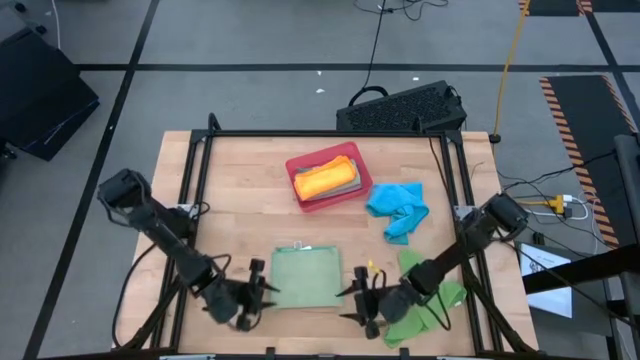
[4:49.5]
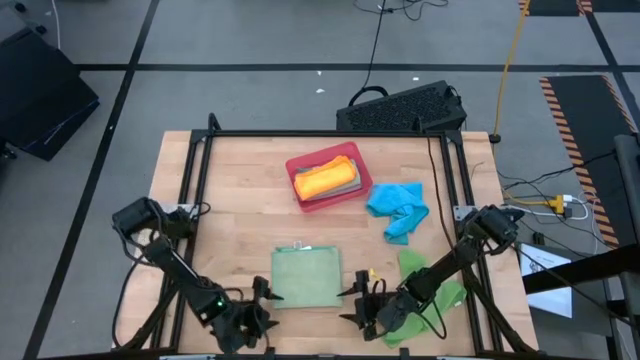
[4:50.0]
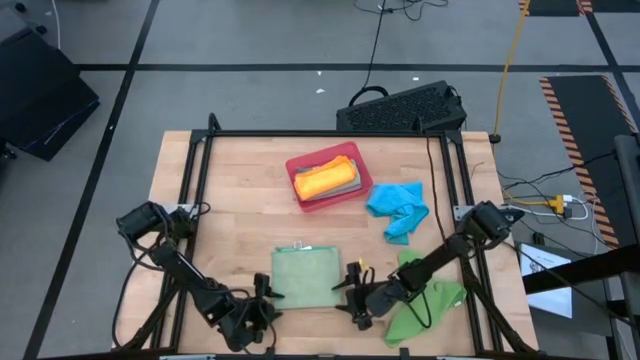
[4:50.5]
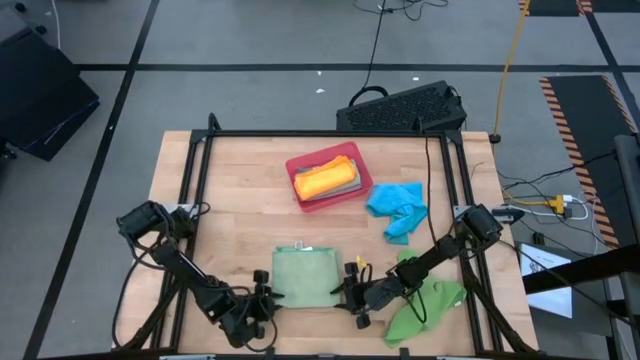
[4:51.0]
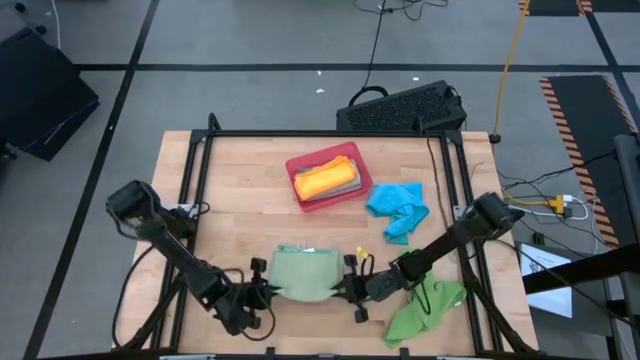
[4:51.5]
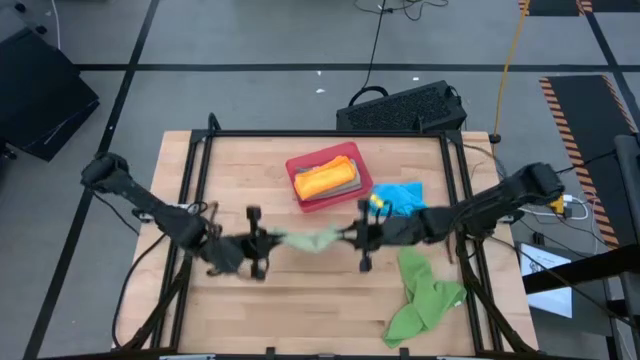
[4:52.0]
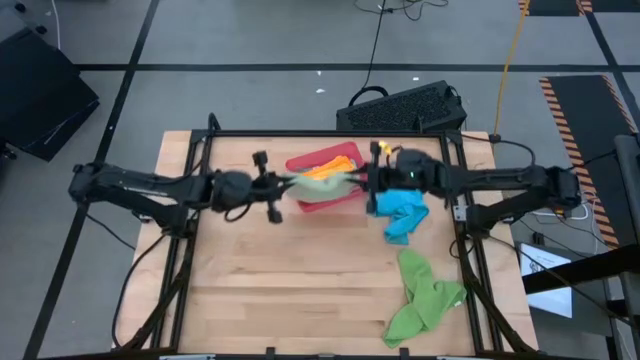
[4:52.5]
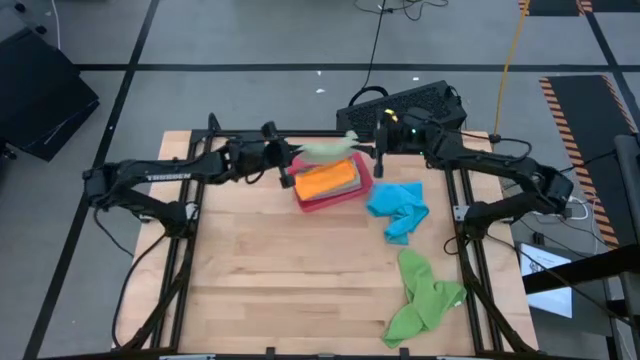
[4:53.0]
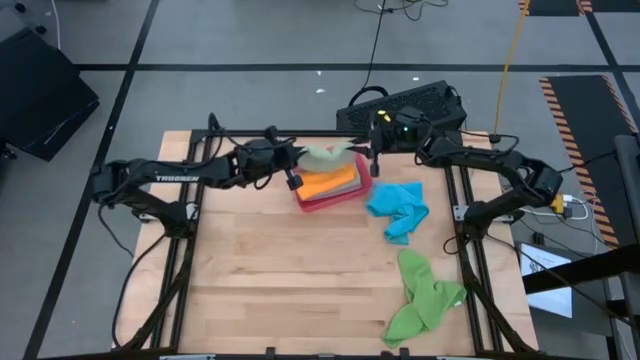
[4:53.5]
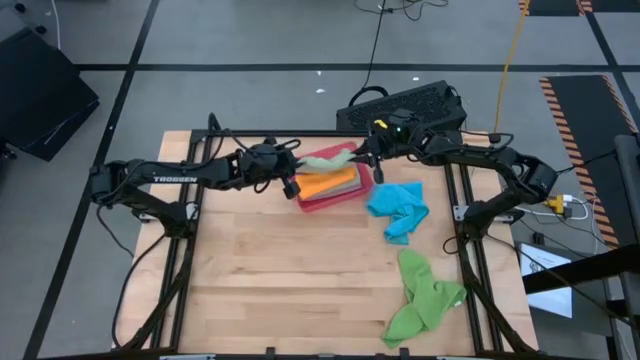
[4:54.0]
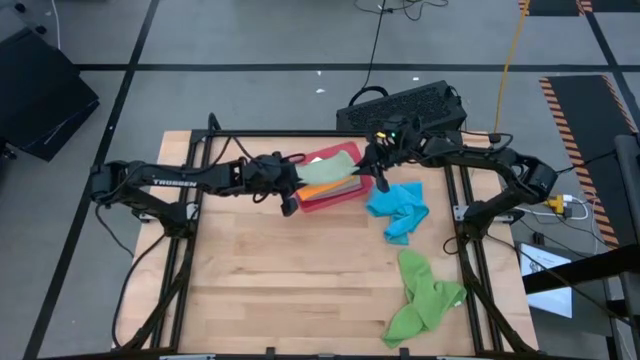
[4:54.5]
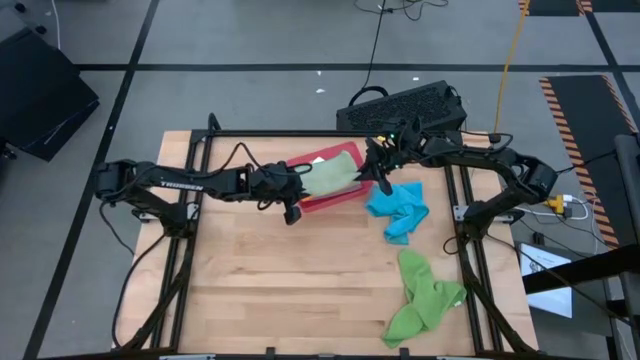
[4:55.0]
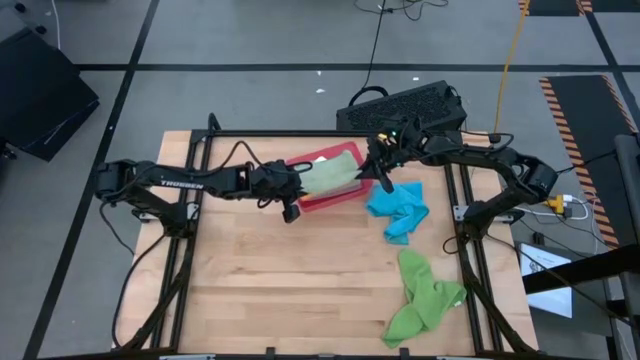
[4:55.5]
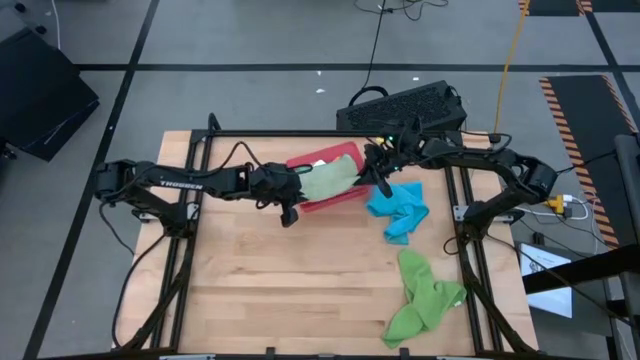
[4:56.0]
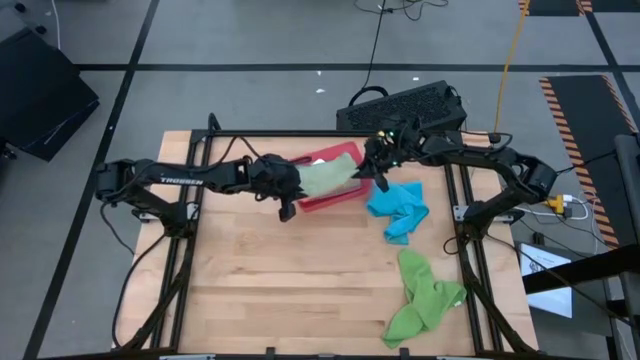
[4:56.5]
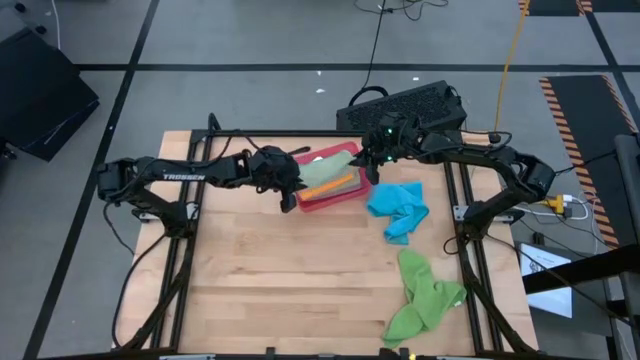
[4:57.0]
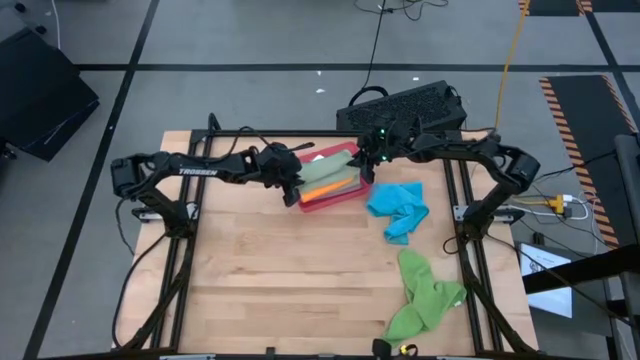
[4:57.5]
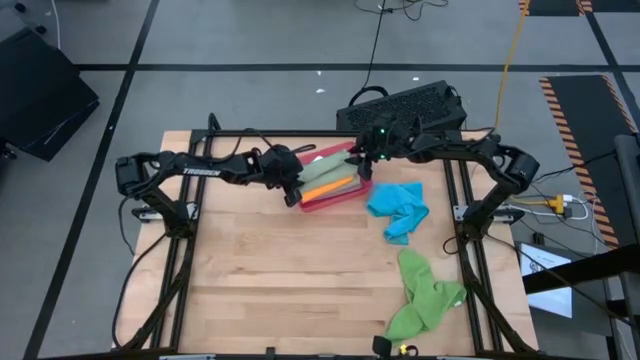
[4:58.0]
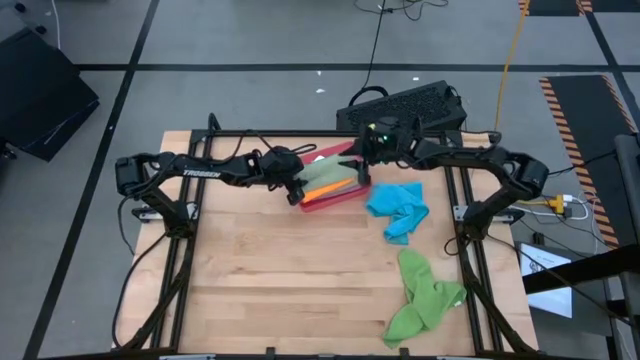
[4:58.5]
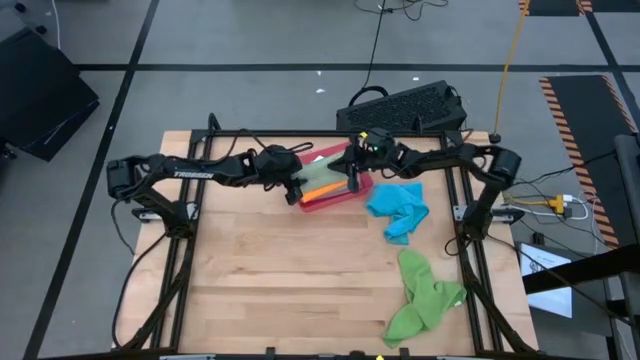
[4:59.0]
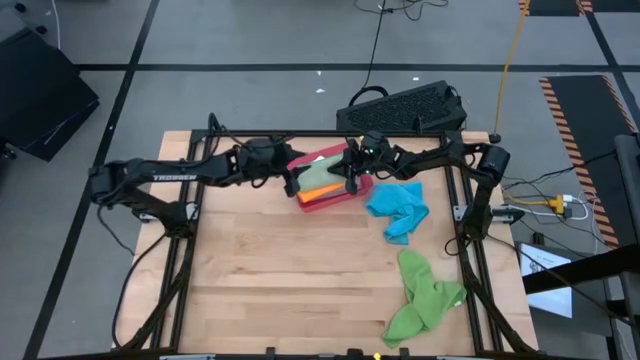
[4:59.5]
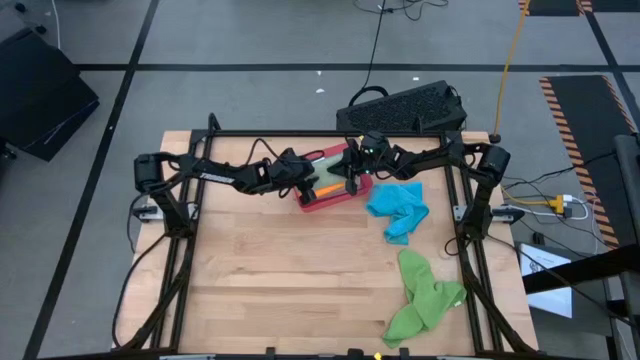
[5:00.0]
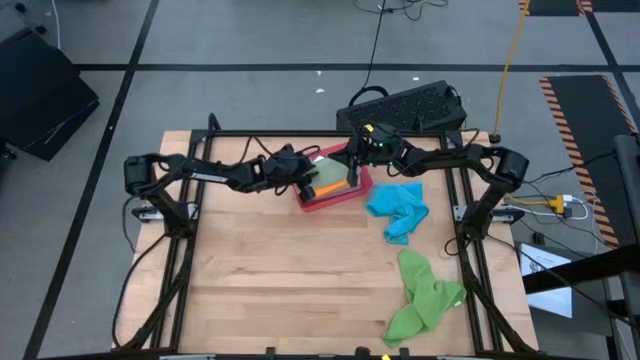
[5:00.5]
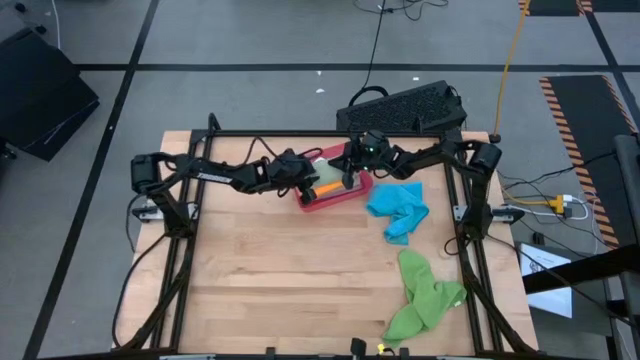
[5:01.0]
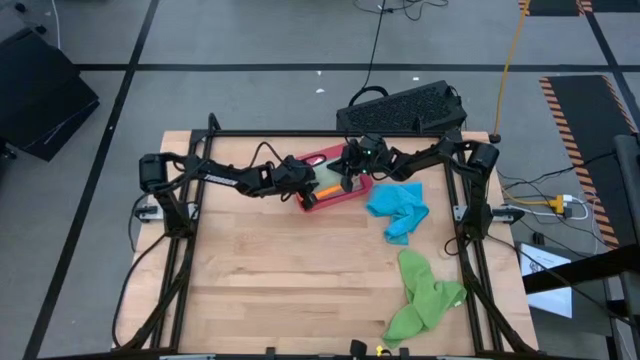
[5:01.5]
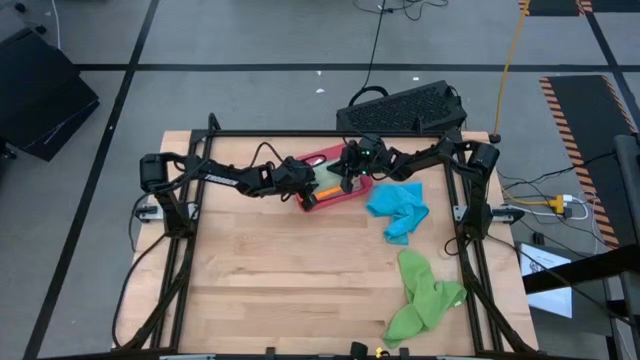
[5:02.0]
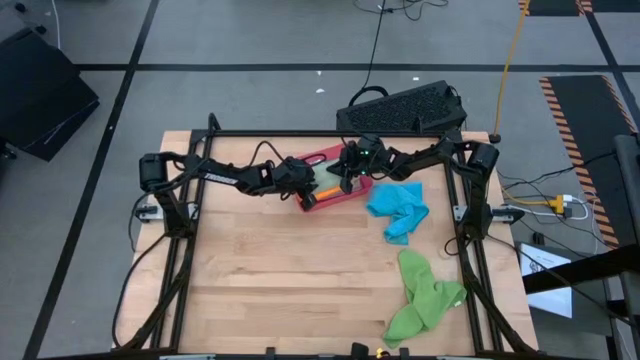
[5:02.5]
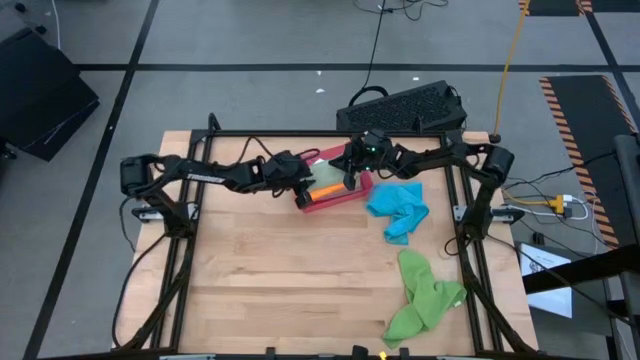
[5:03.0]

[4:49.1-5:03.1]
Task: Fold microfiber towels
Put the folded light green microfiber towel into the red bin
